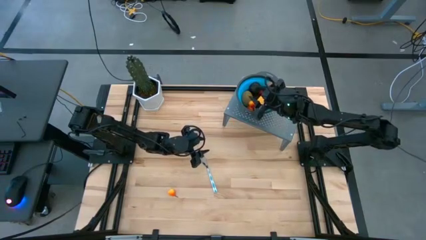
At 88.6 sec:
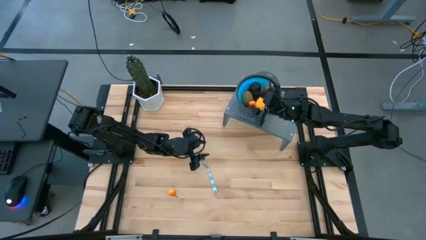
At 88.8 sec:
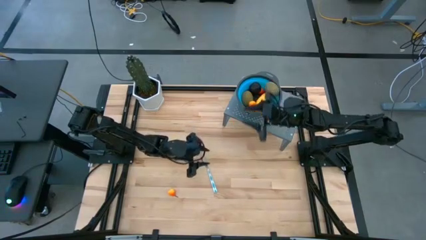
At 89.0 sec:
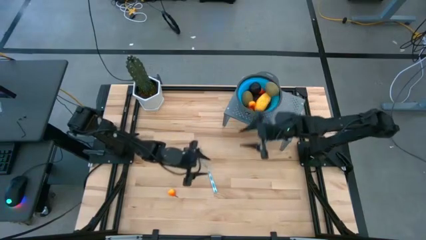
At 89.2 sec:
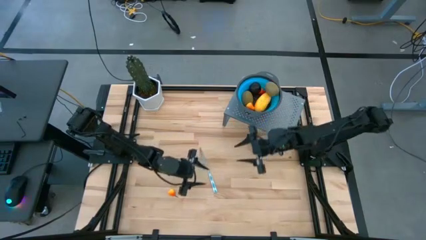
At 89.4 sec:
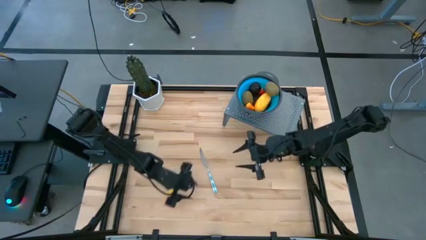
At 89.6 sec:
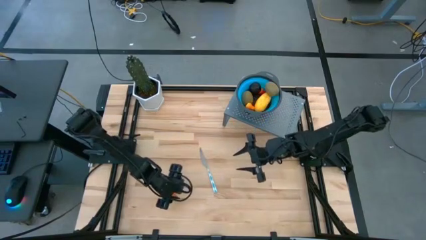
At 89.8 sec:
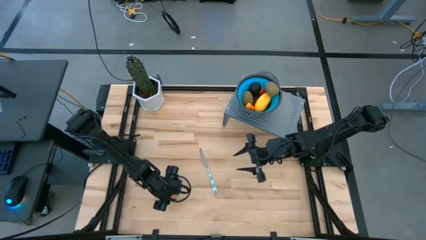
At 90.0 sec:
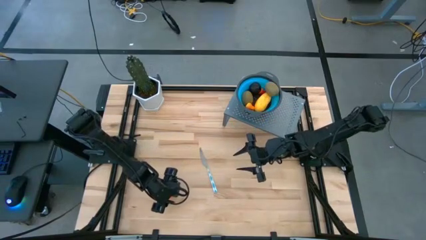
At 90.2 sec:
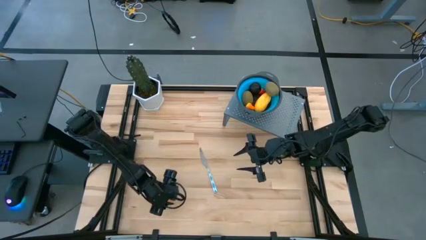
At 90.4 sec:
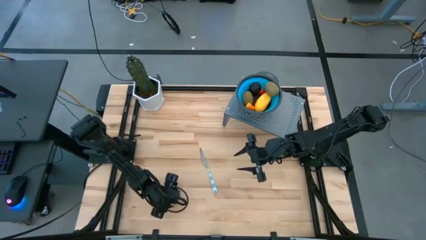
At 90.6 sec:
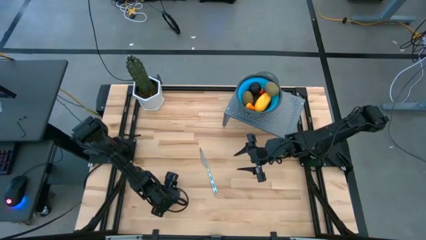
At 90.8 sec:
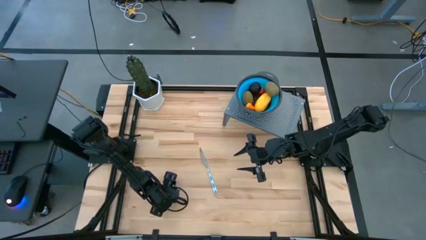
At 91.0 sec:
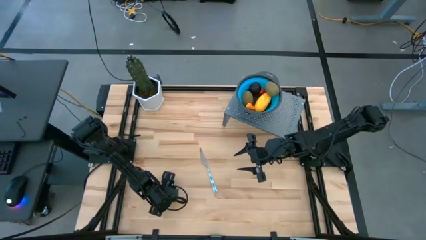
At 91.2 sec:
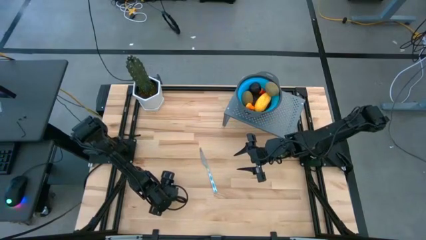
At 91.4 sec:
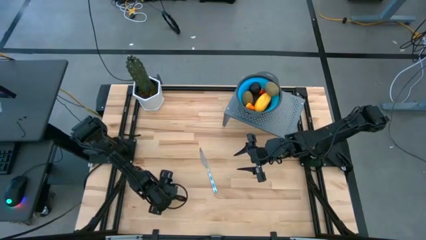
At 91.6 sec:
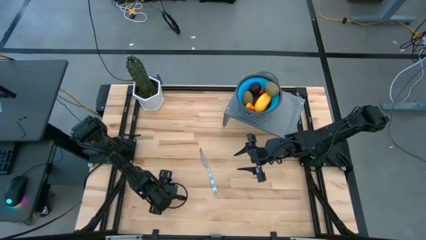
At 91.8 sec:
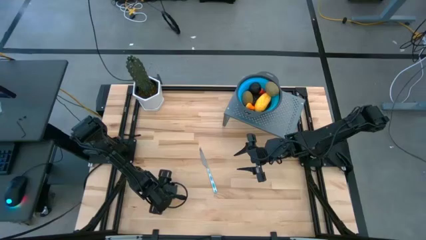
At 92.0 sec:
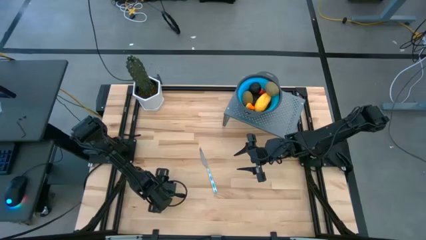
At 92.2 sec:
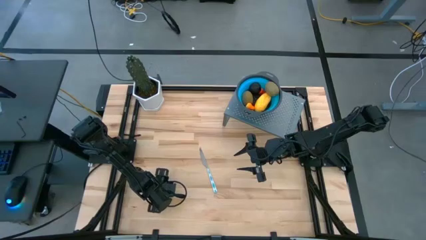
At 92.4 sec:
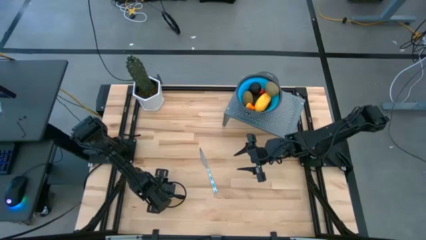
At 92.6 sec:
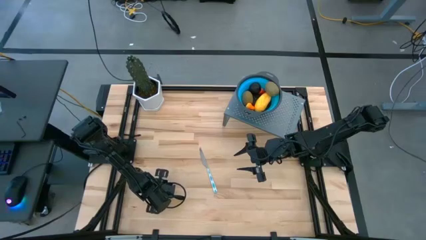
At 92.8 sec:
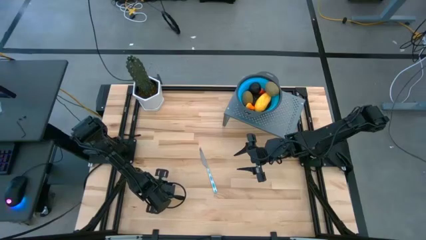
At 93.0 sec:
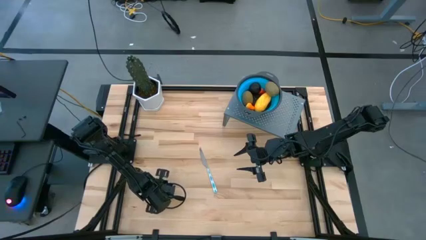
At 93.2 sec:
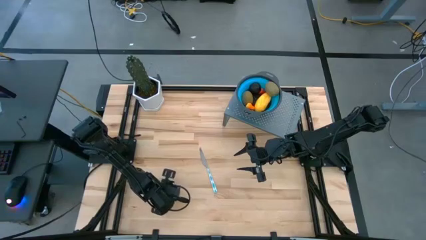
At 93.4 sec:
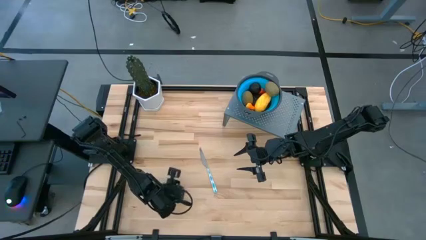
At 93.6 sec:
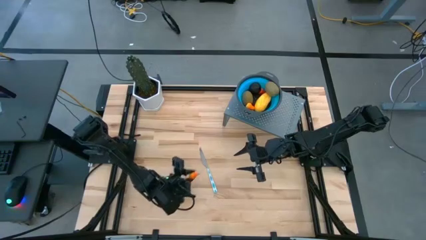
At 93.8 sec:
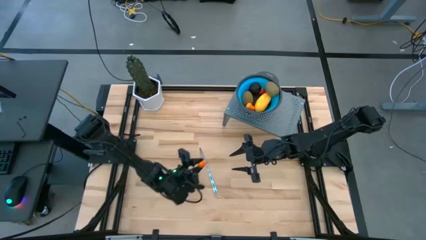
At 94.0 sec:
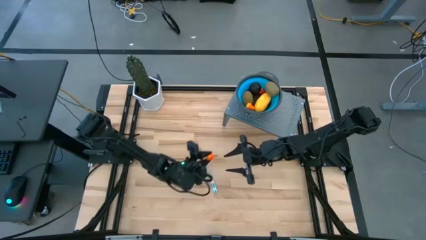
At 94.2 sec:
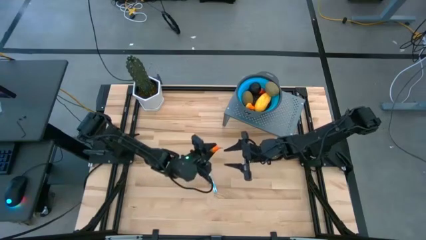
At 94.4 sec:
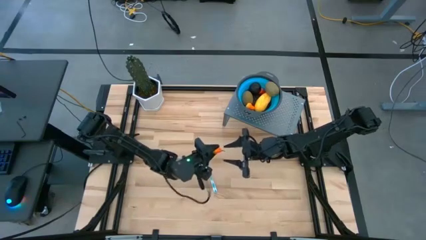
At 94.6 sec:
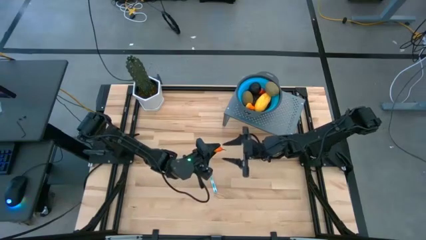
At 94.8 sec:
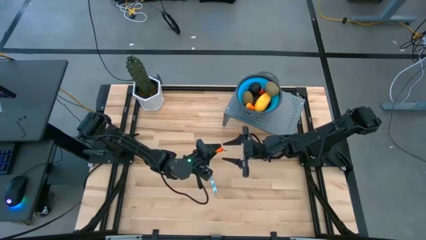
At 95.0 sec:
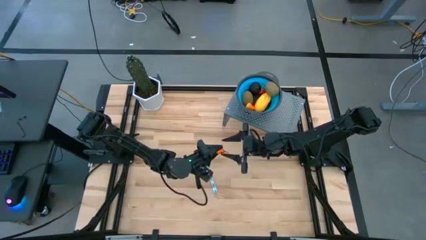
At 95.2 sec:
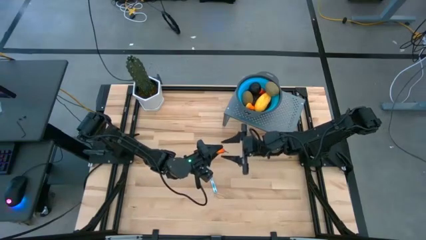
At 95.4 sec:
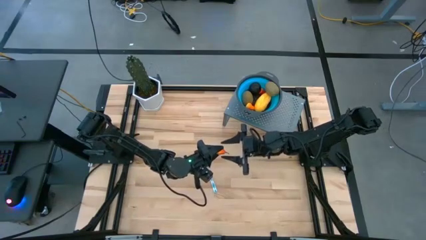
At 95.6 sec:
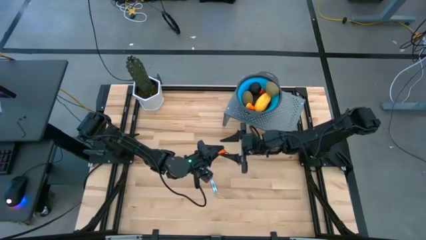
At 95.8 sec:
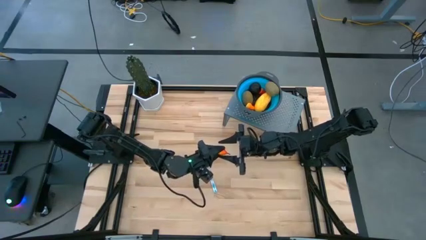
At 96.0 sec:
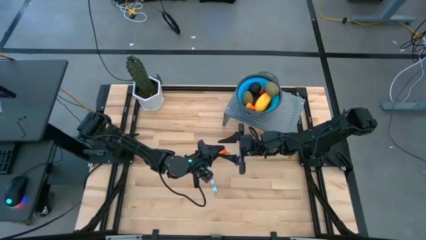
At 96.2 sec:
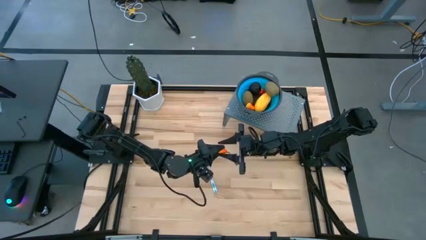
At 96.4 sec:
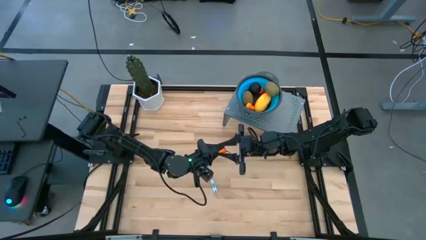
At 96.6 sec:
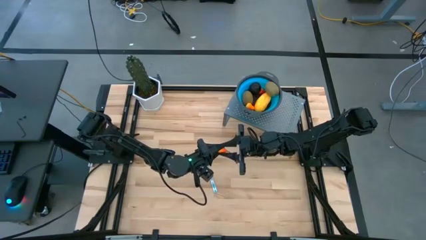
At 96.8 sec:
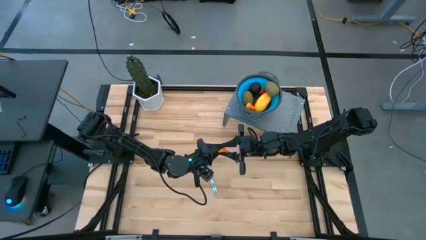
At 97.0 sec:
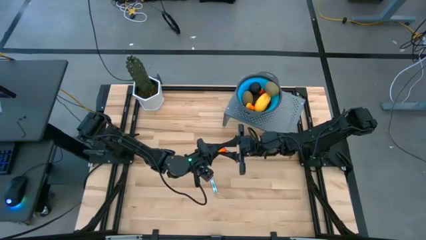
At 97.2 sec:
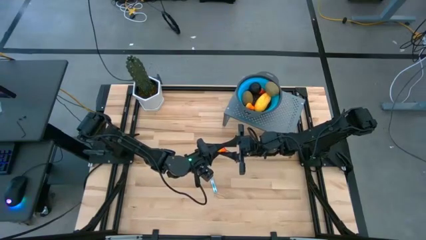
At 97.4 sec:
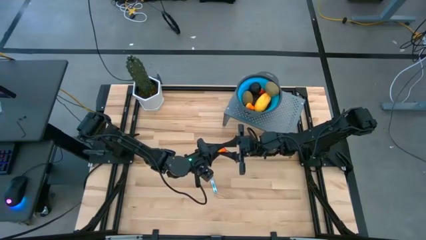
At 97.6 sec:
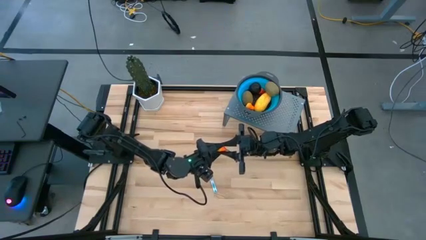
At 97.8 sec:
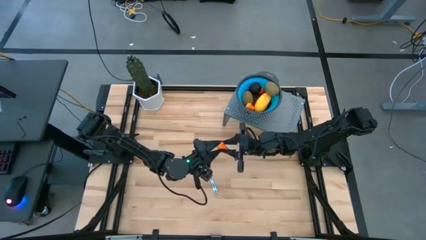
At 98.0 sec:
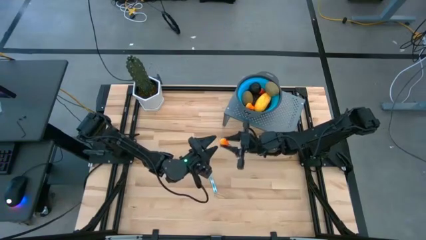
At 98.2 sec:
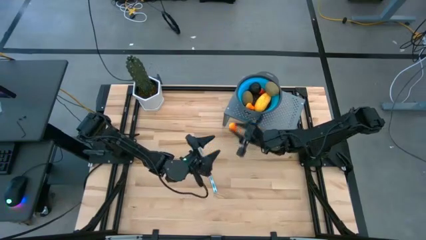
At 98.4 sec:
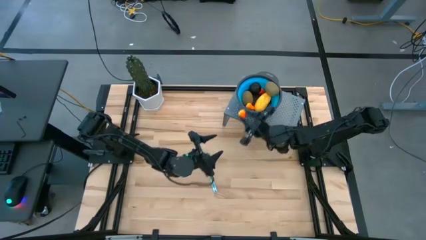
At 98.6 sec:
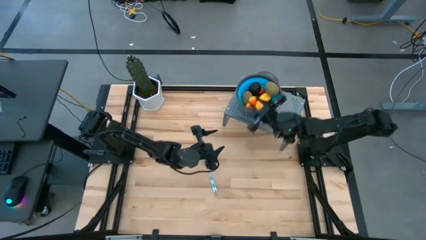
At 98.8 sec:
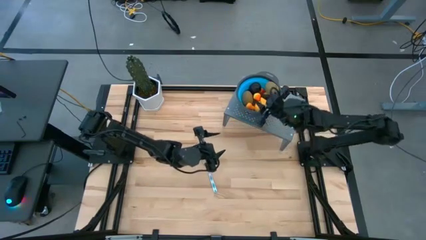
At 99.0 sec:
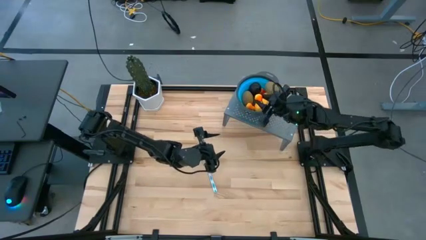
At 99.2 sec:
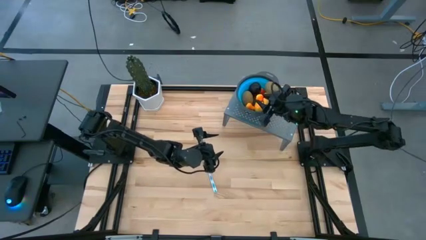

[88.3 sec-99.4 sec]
Task: Pick & Place Fruit
Put the orange peach in the blue strainer bowl on the shelf

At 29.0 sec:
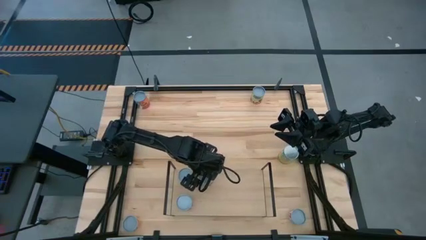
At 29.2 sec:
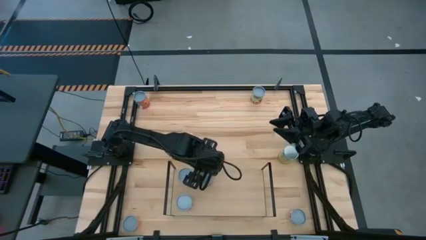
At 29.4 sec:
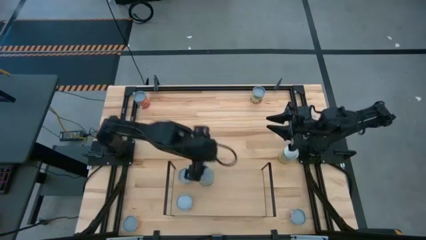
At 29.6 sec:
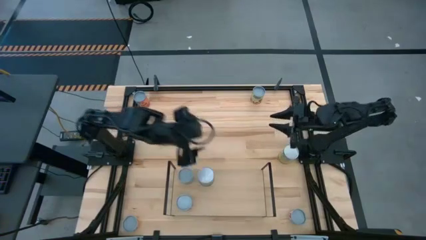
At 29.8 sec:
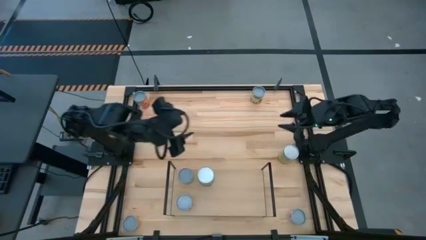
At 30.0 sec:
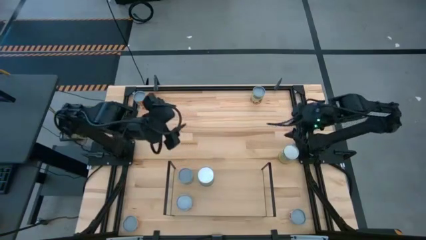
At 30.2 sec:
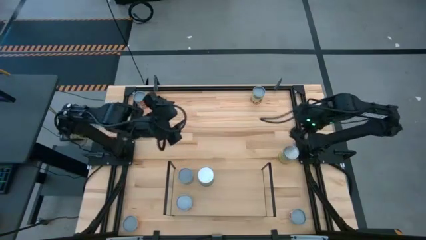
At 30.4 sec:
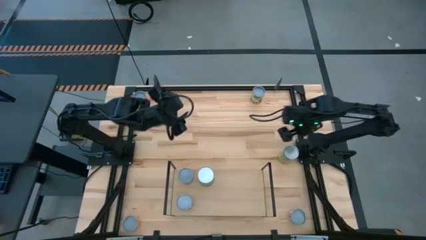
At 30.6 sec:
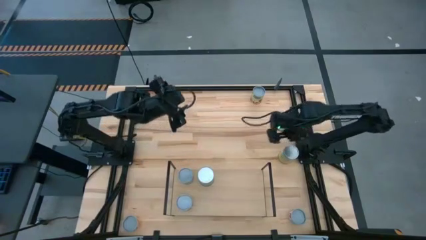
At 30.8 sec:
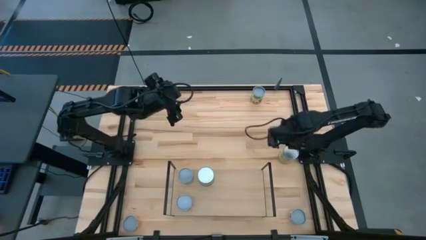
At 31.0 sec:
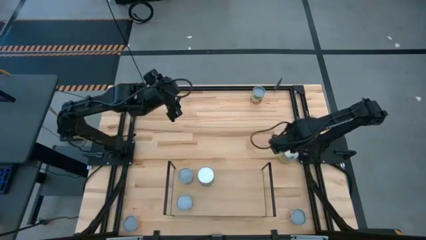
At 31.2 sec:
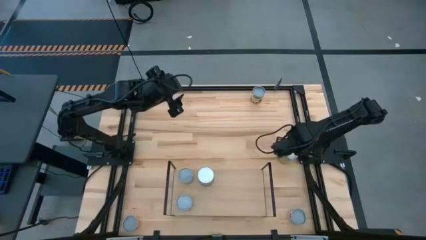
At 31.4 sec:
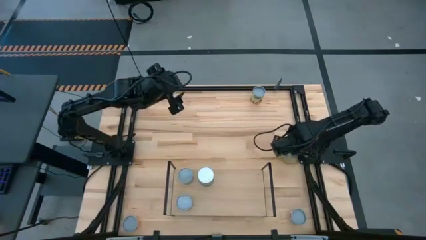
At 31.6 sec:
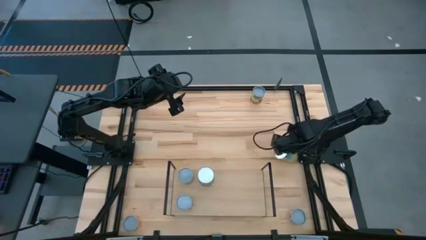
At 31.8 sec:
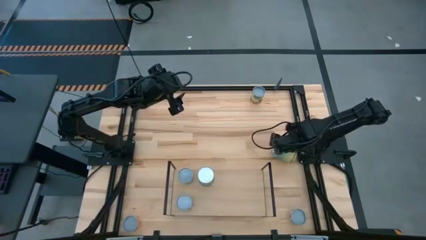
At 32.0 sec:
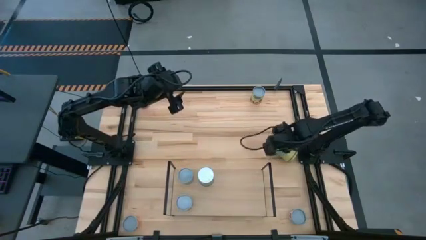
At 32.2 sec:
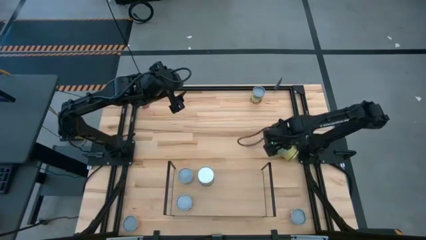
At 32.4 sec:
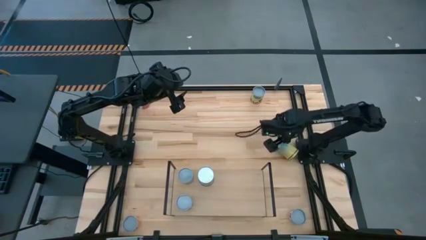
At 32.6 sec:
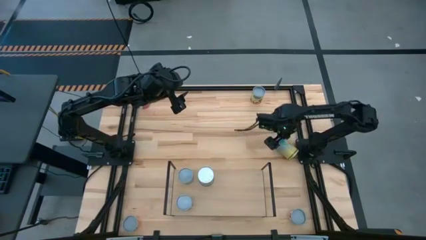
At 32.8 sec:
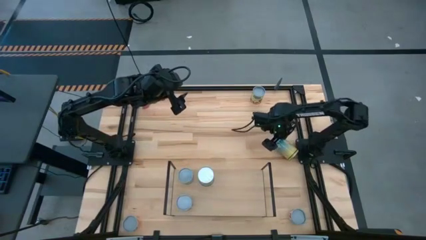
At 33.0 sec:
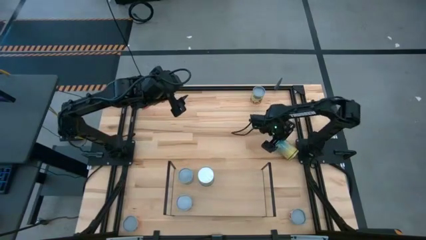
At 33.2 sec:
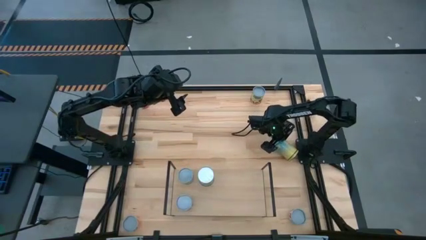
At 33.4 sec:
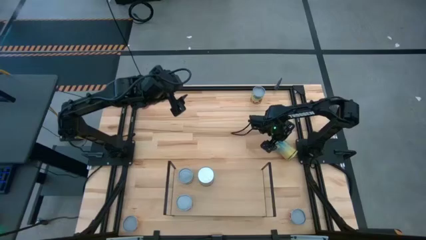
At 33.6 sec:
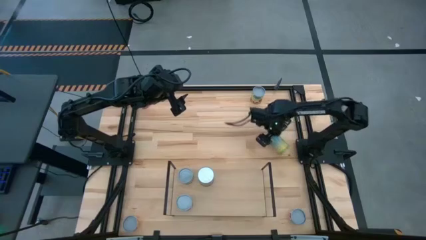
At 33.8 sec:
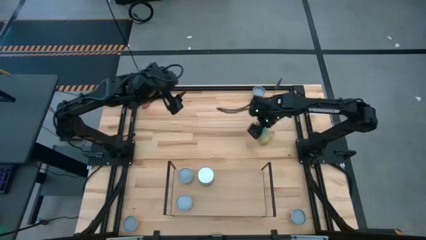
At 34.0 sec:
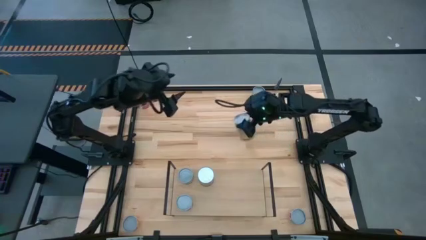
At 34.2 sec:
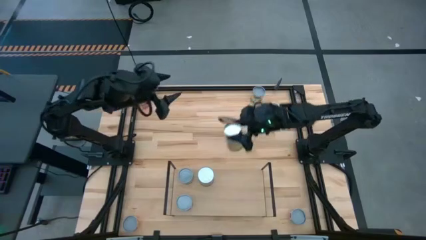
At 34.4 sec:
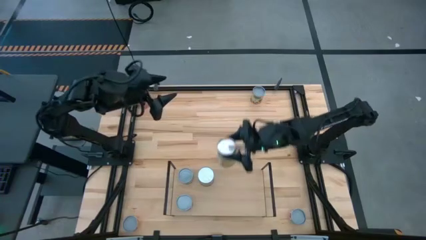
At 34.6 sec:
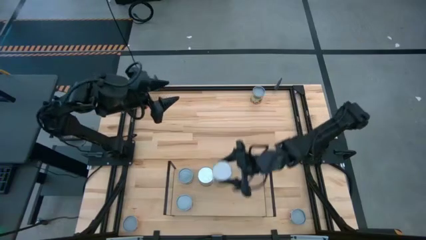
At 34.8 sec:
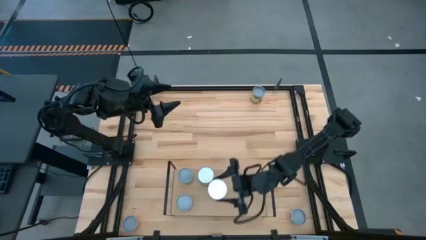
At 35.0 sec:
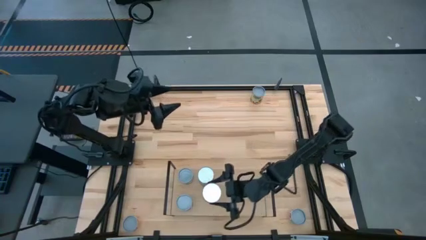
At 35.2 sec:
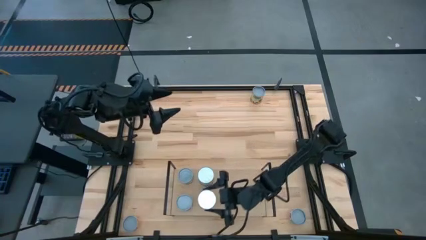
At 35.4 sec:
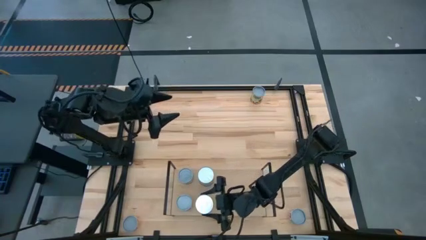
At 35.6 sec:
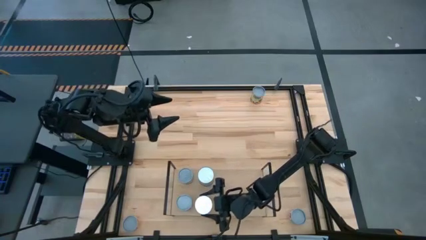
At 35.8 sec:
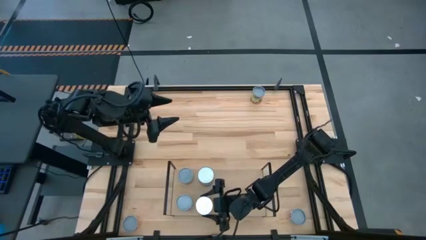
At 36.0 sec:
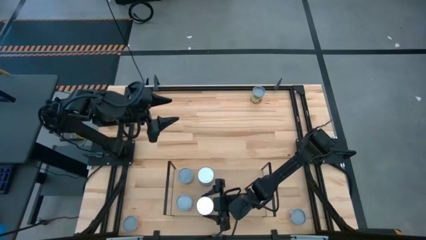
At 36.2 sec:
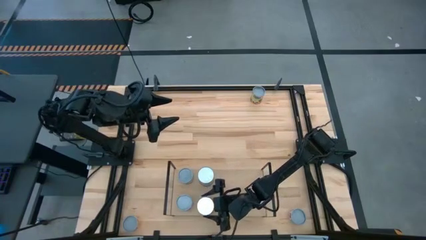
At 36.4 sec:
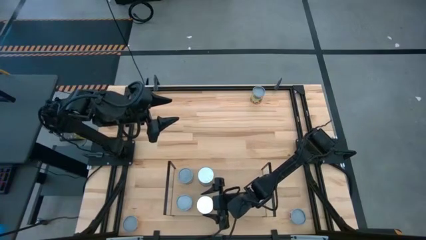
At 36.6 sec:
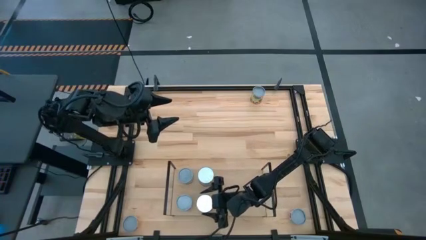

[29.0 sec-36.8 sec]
Task: Pick and place cans onto a shelf
Put the canned carrots on the shelf
